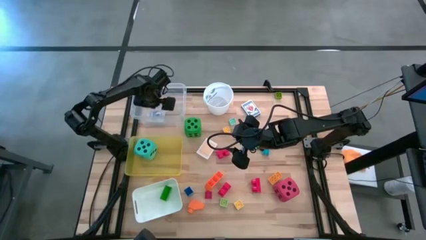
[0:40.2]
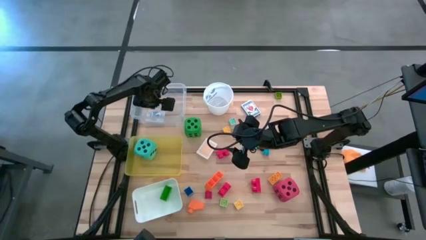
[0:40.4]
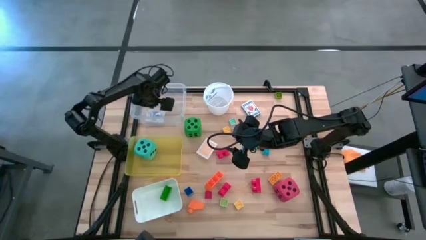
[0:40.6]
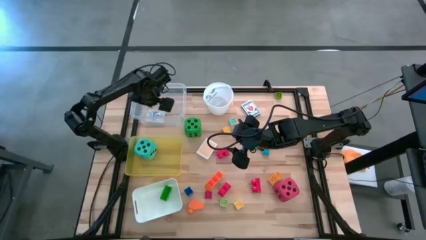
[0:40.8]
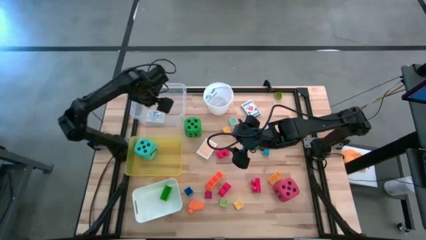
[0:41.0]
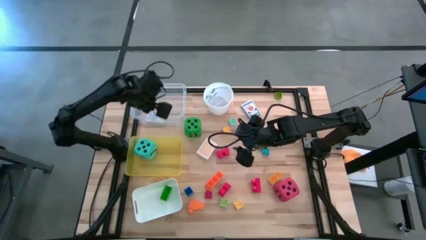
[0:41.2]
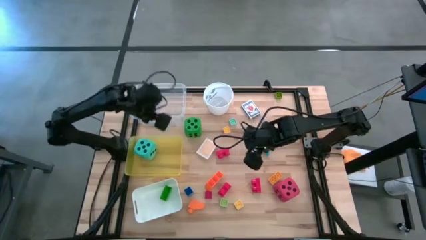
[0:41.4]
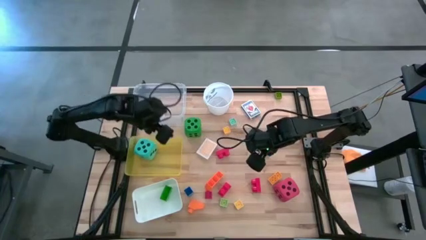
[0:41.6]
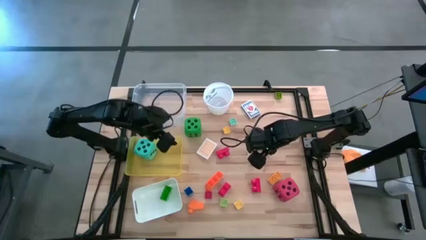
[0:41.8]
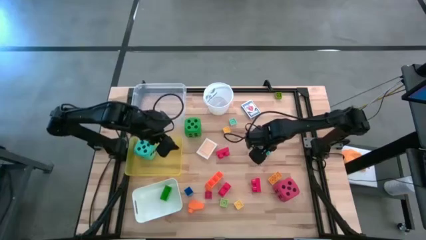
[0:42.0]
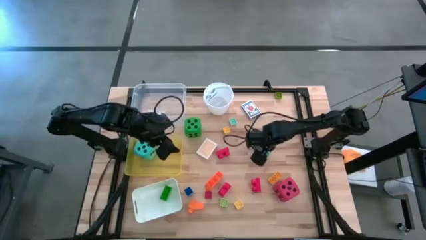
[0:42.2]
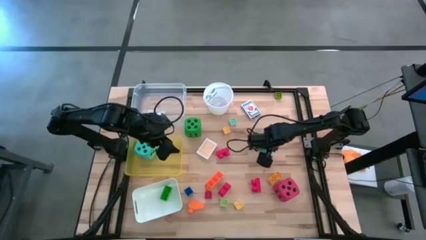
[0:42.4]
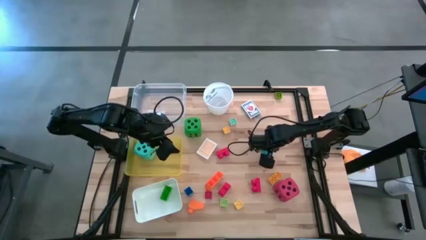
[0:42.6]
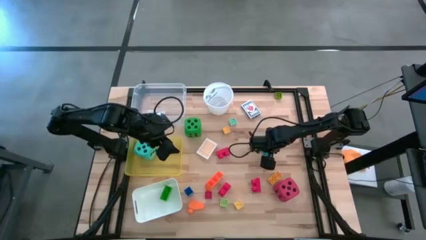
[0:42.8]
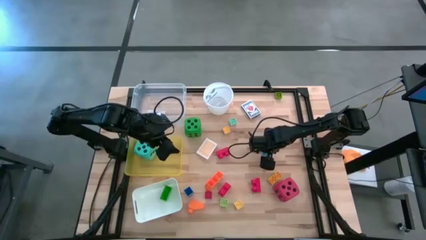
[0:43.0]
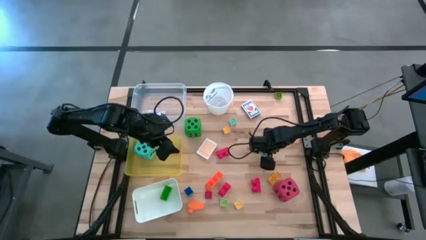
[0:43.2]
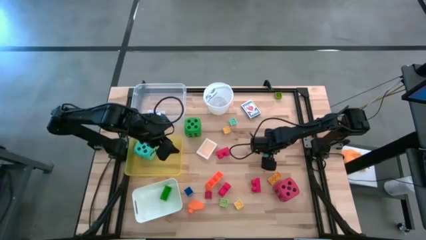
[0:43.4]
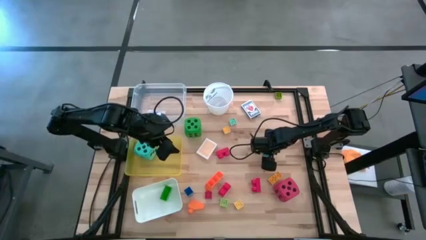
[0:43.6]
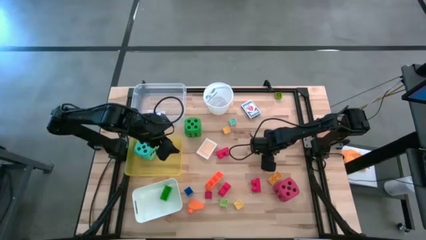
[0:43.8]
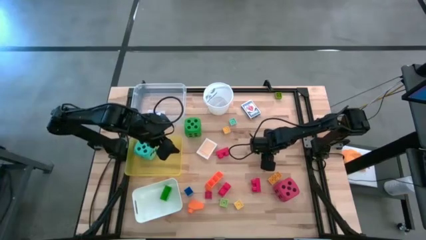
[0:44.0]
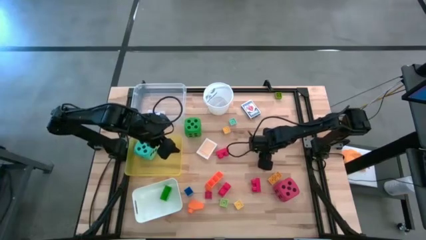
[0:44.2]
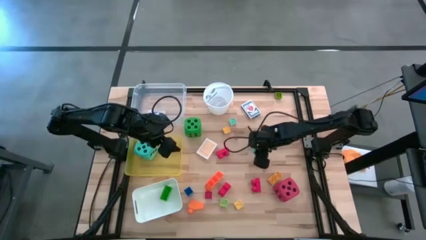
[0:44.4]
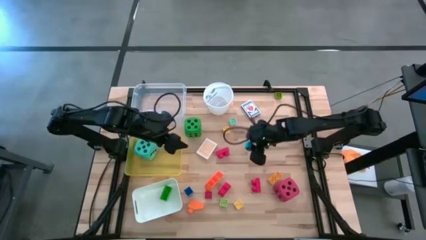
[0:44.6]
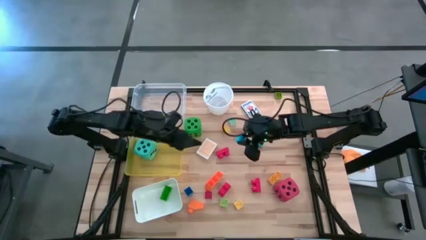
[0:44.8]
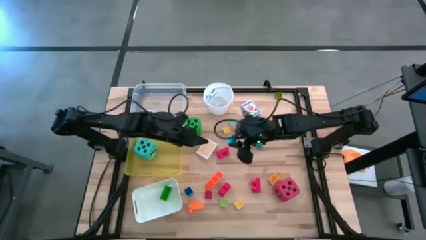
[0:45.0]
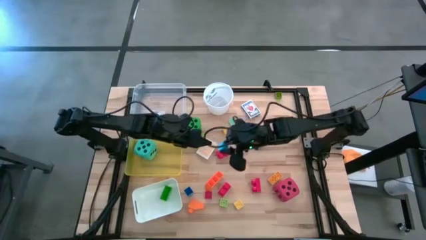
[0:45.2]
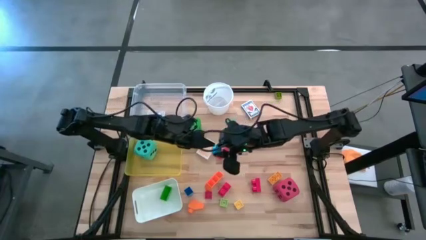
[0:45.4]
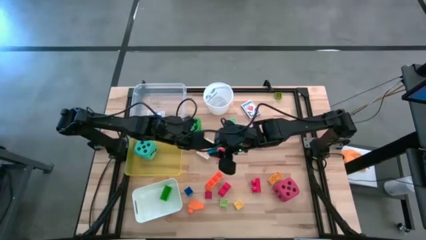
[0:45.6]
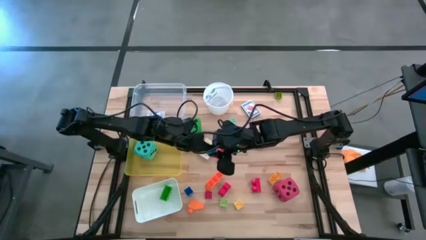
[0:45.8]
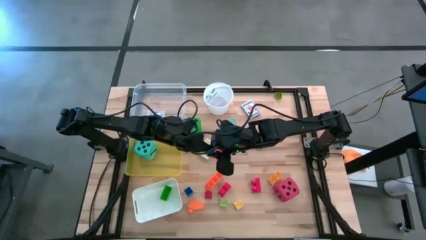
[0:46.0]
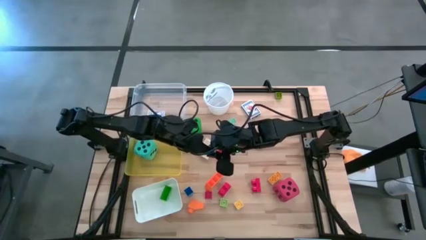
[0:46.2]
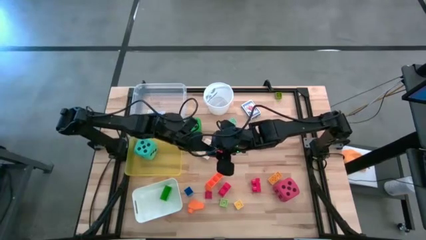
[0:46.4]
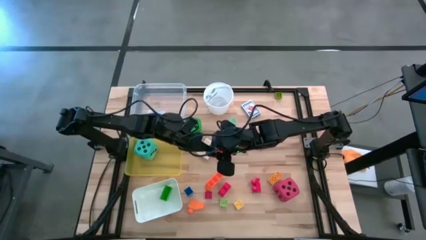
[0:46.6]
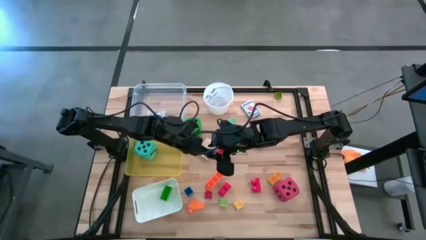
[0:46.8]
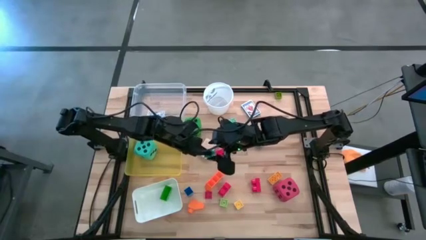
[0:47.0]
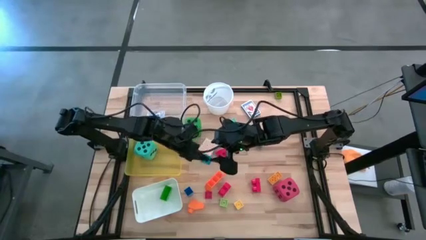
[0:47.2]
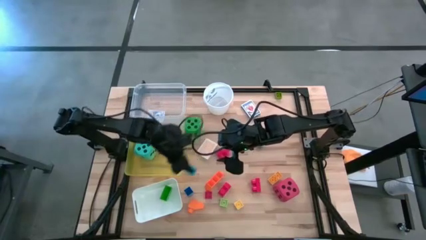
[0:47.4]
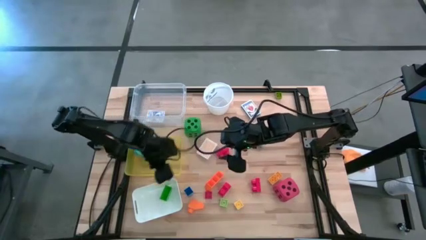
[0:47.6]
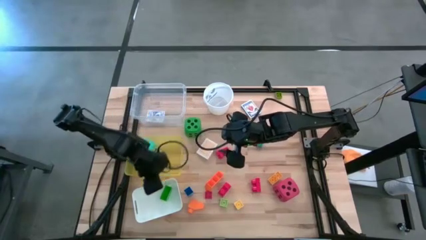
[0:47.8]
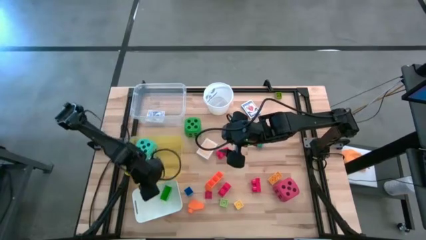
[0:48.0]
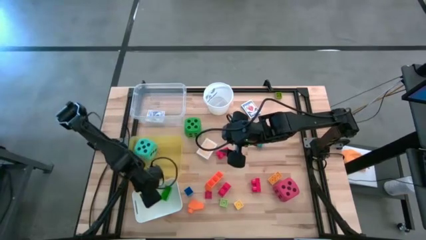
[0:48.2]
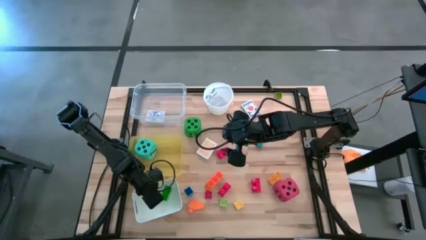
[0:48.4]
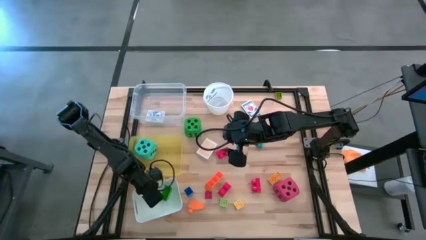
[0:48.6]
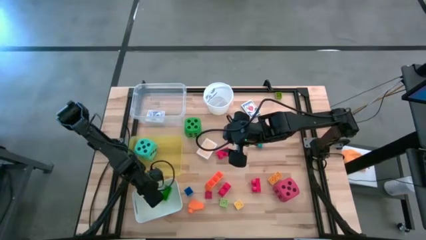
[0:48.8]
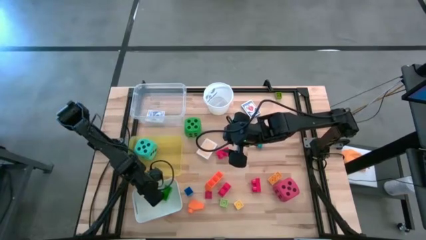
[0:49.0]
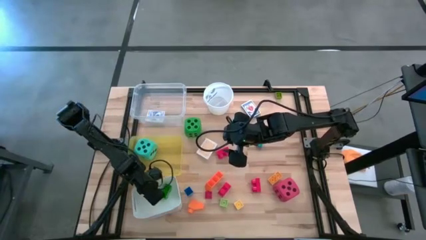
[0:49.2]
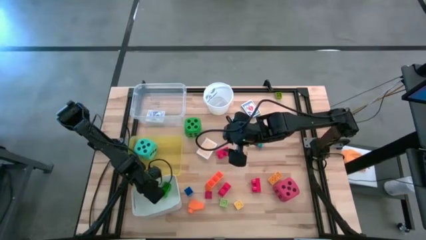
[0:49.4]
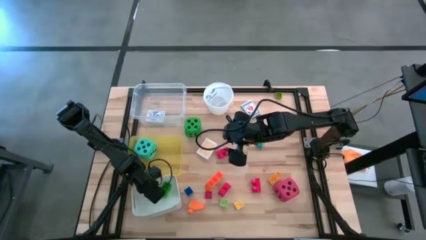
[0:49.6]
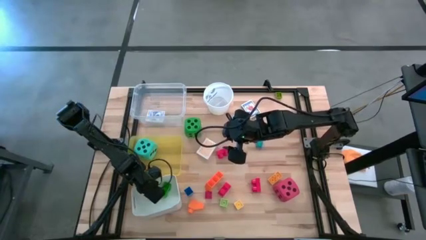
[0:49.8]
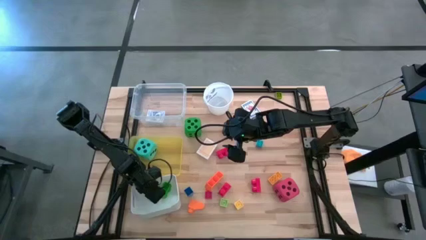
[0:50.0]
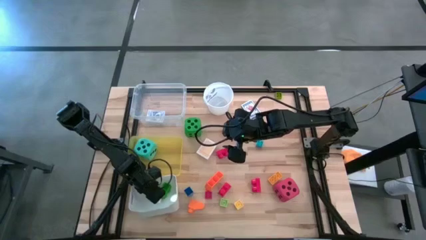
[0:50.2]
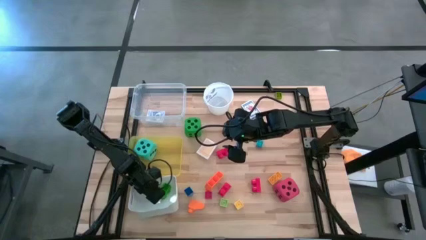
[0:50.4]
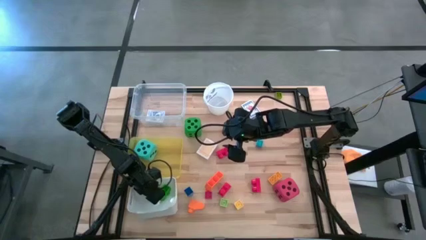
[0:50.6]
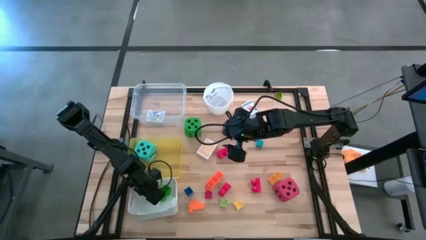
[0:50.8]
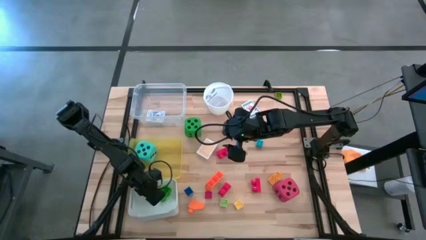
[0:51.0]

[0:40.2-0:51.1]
Task: Pick & Place Toys
Put the right blue game piece into the white bin

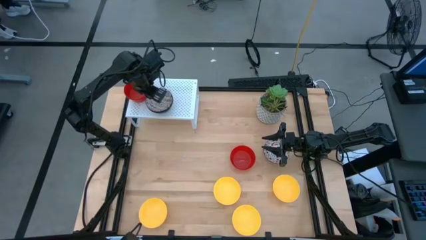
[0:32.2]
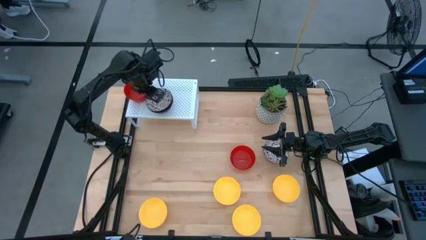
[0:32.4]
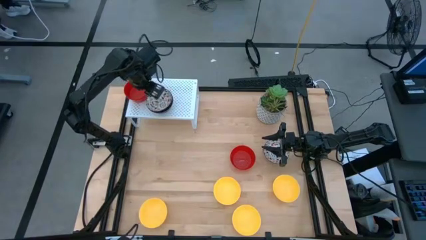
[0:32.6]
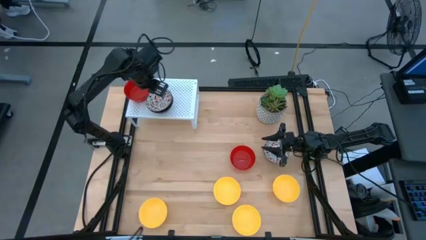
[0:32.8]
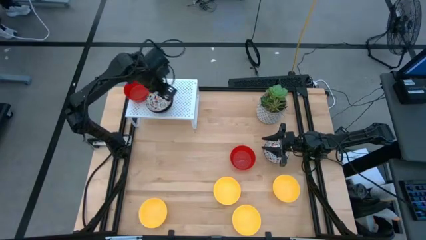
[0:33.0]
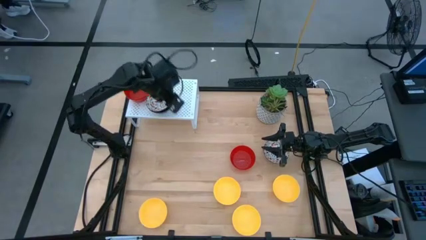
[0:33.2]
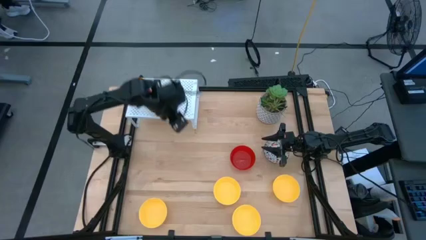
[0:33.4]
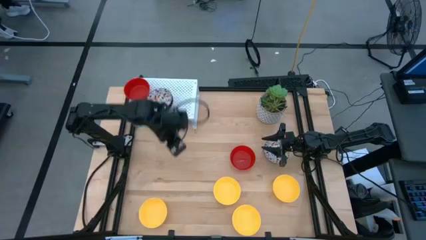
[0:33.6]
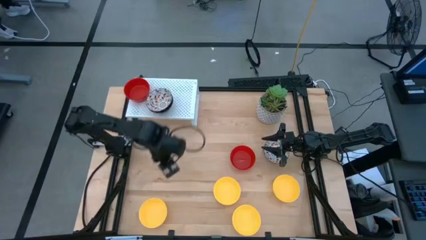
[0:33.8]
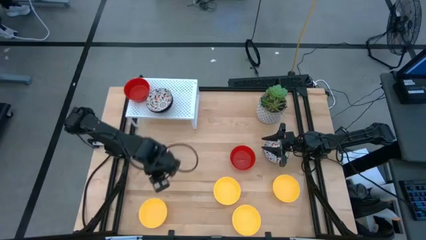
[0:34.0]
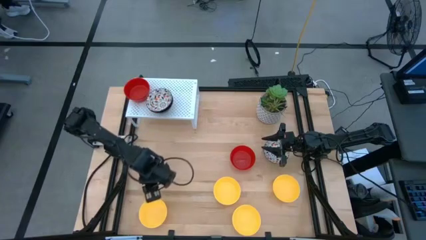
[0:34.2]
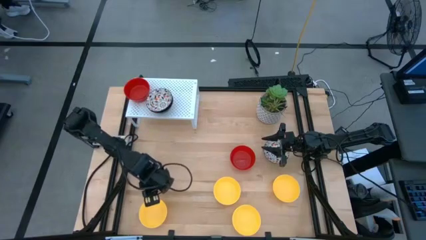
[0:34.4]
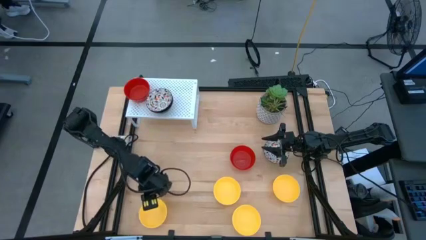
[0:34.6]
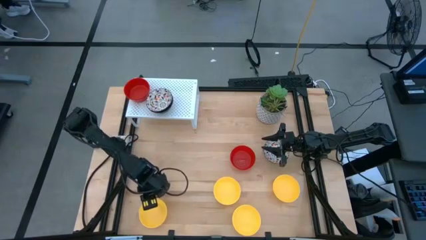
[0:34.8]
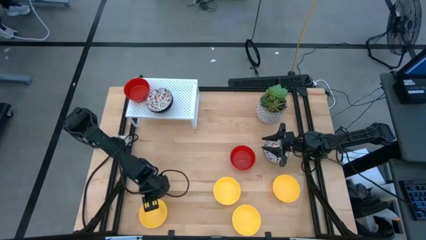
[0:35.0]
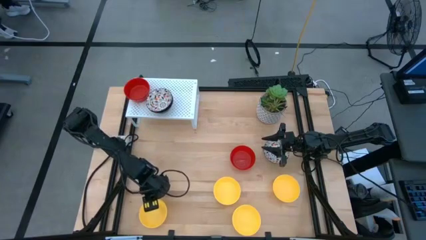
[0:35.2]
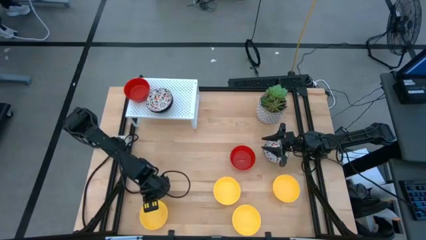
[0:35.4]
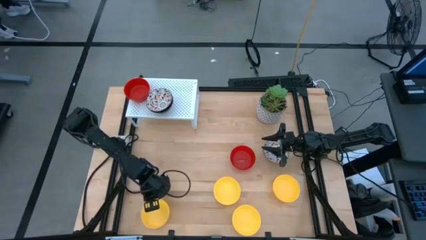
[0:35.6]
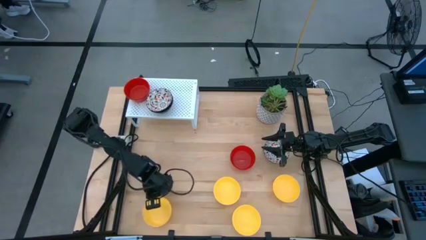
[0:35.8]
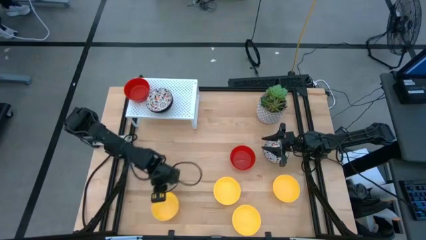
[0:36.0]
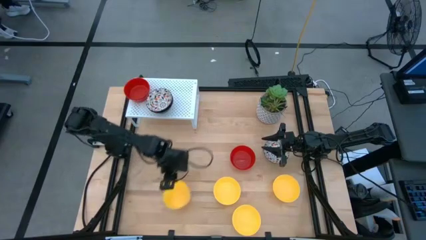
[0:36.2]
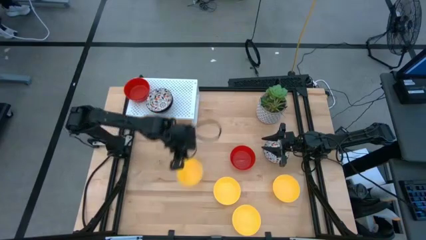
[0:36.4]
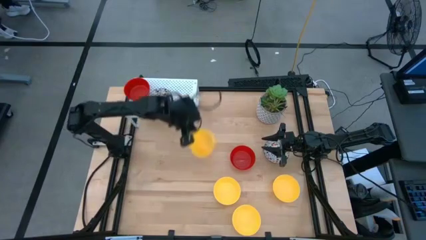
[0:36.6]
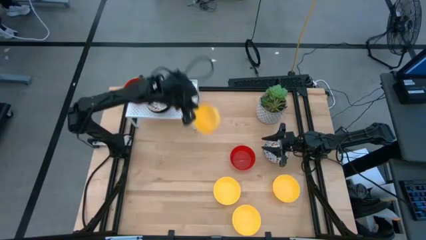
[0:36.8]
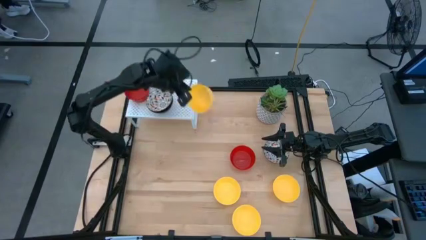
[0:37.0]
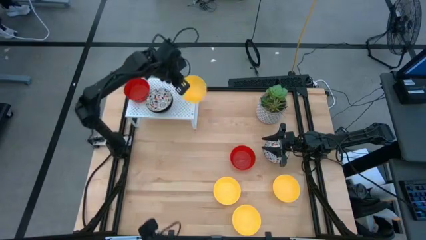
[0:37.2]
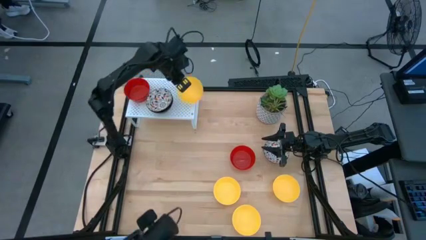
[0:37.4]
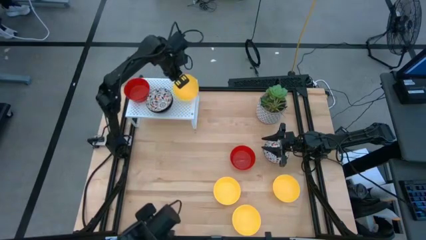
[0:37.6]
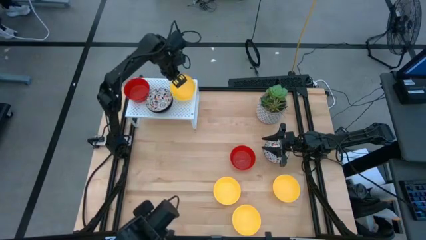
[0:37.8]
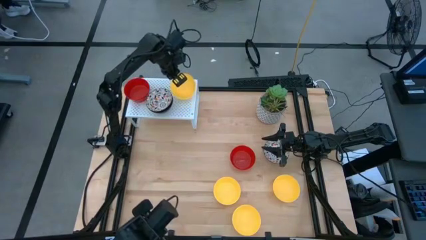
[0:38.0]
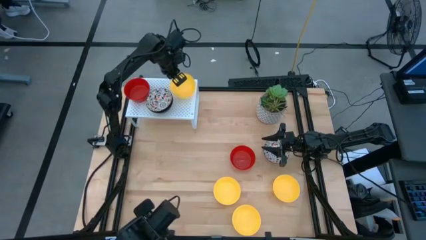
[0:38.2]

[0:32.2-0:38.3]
Task: Pick & Place Mini bowls
Put the yellow bowl on the shelf
